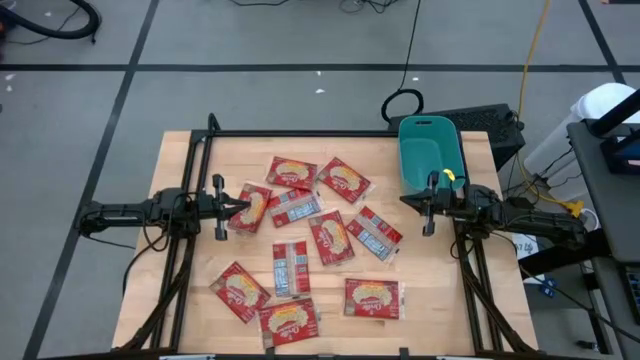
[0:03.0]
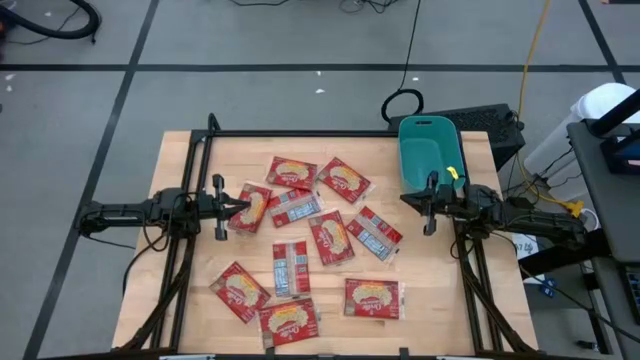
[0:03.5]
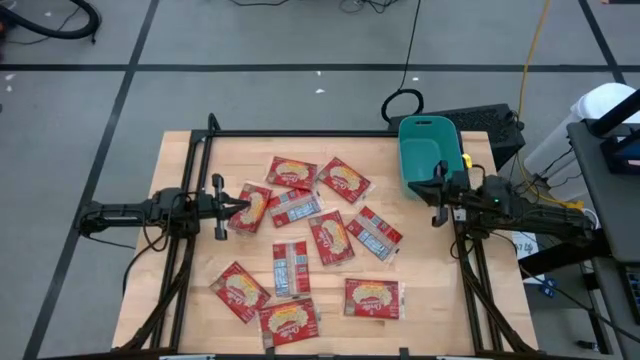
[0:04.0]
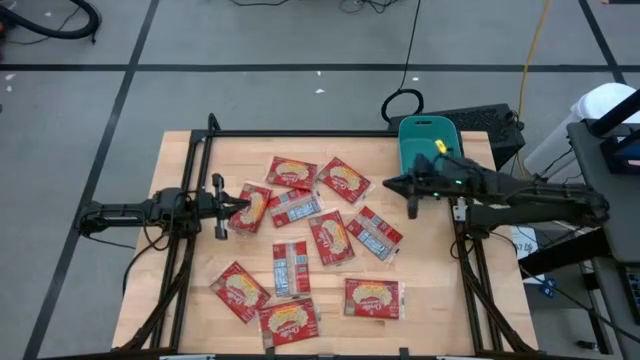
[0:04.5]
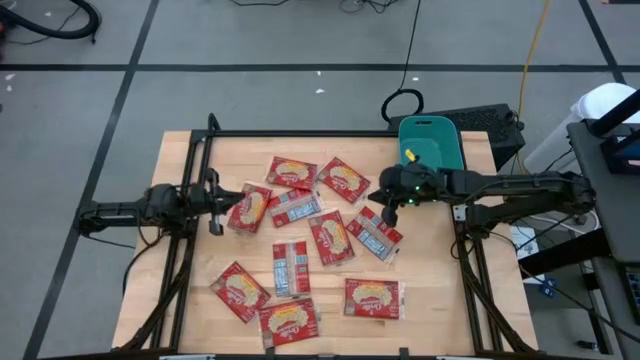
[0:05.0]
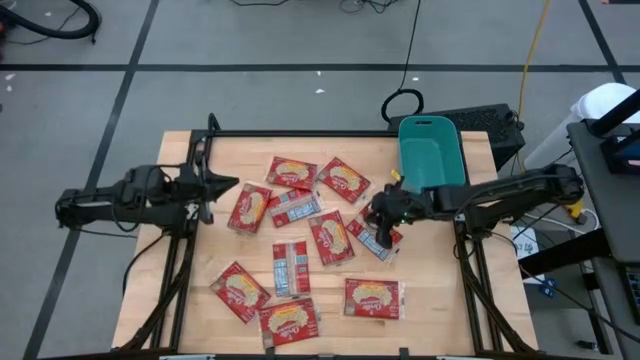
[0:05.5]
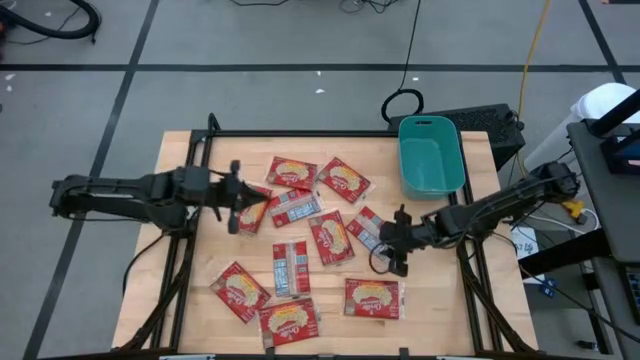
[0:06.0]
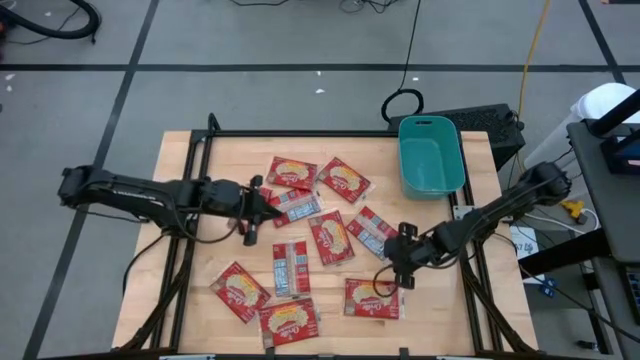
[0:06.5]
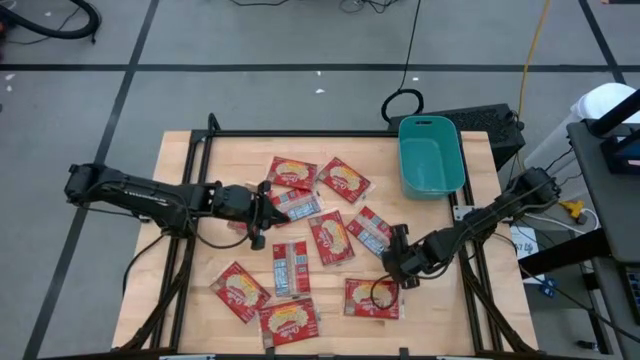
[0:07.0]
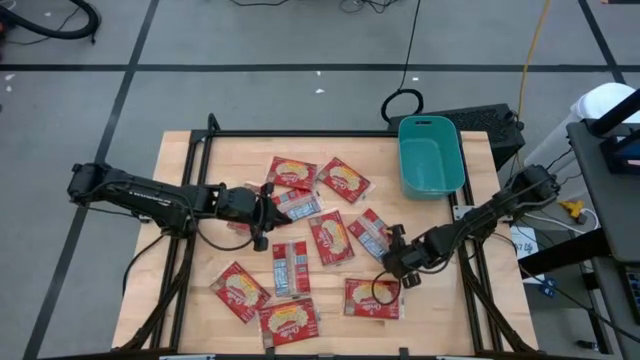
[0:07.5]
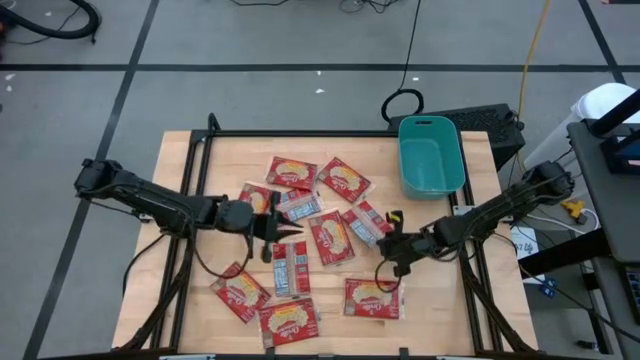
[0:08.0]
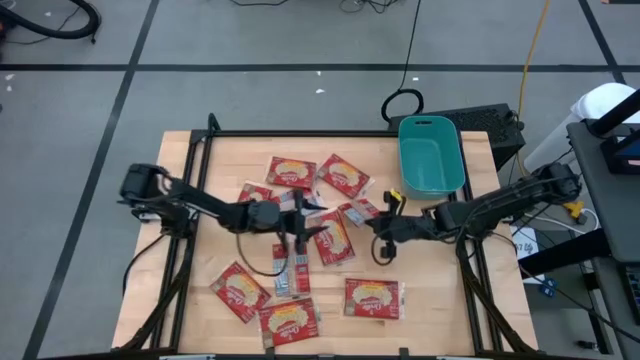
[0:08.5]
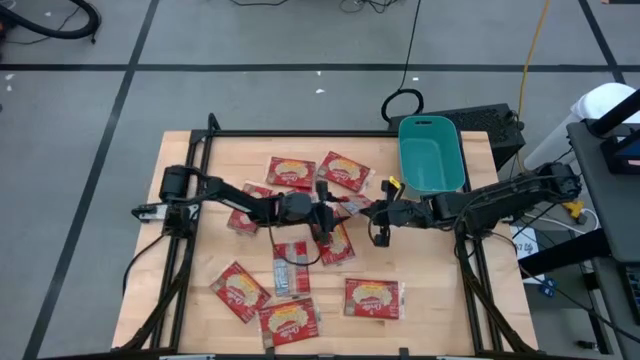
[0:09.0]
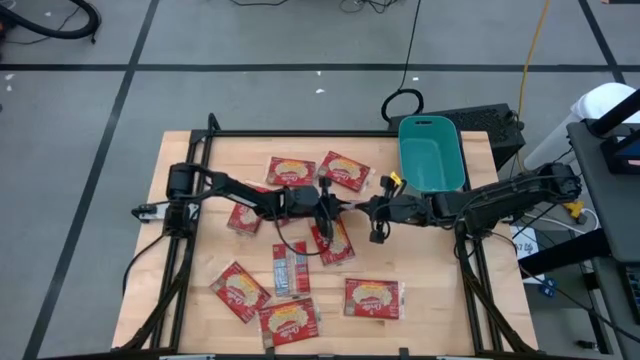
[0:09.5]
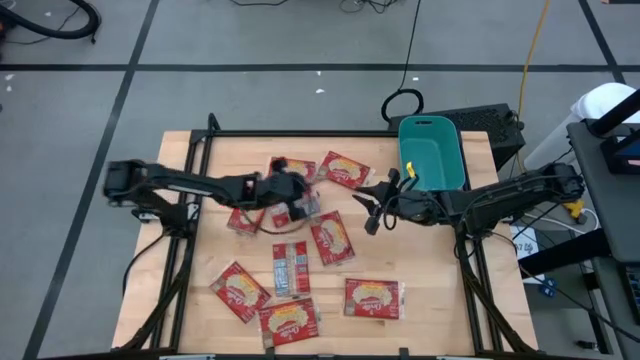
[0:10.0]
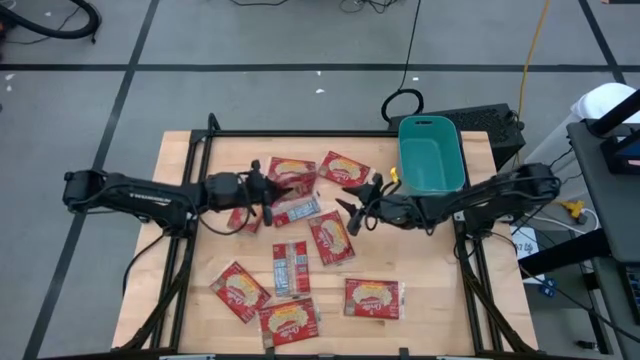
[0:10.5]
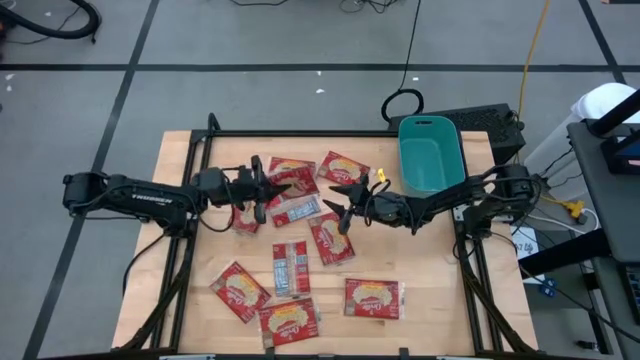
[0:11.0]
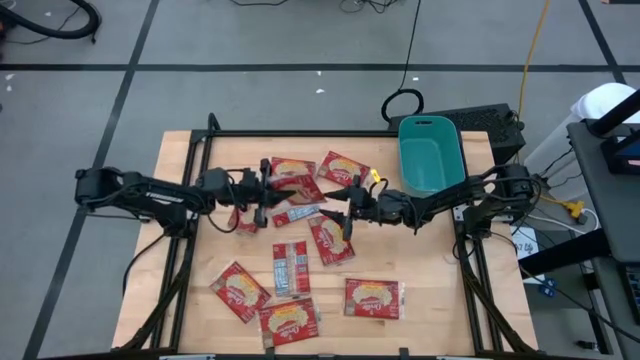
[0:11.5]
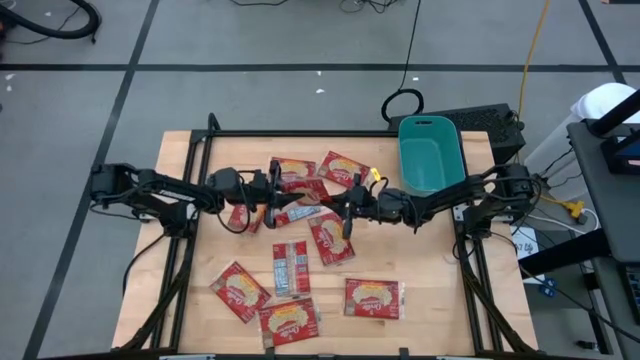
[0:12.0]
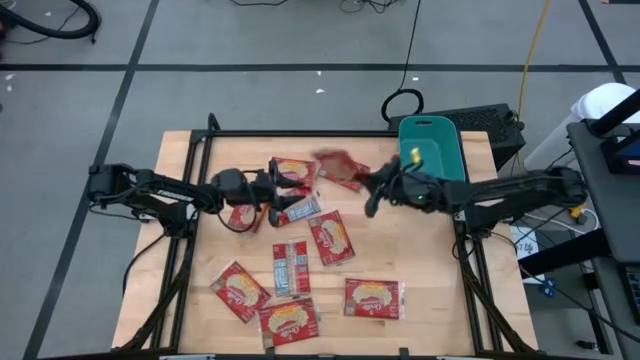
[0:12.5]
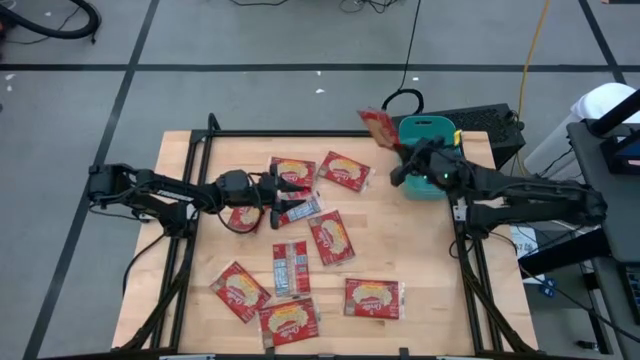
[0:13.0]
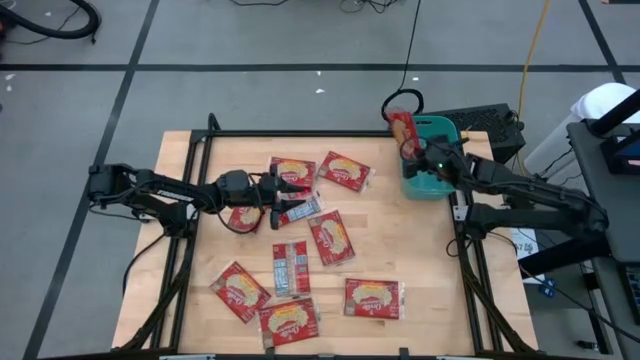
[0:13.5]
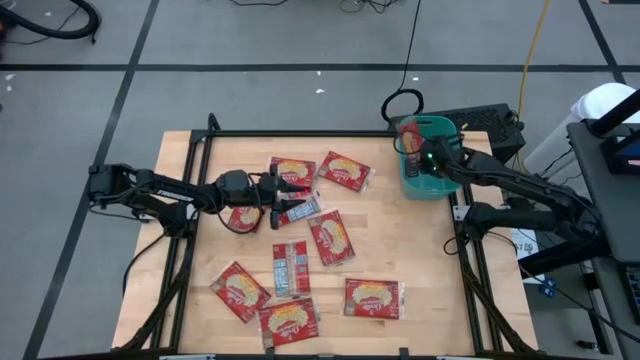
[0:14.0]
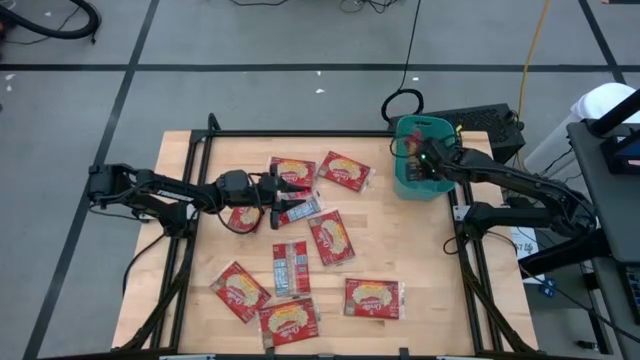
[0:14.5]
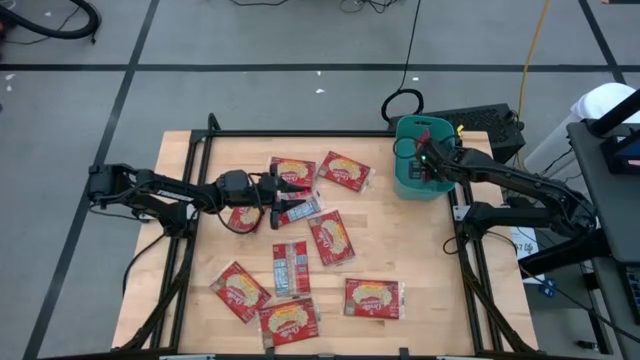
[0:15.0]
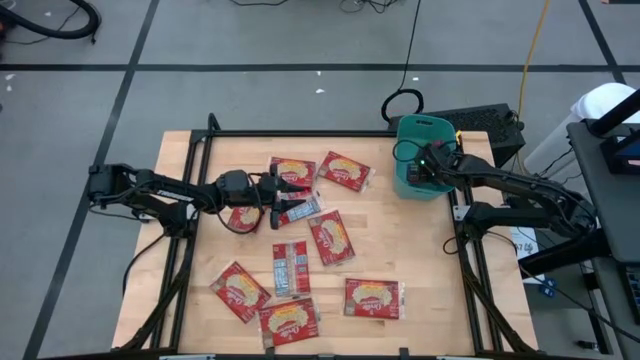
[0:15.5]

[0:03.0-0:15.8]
Task: Sort popcorn bags into baskets
Put the red popcorn bag into the green bin

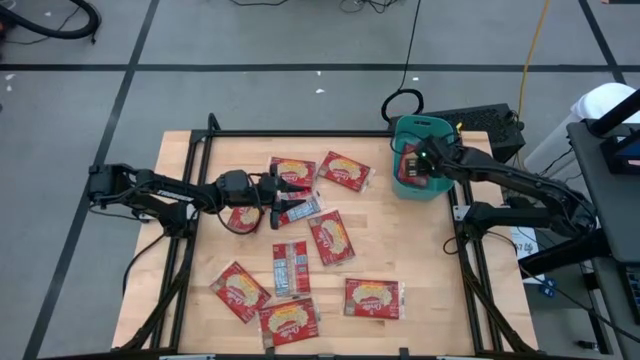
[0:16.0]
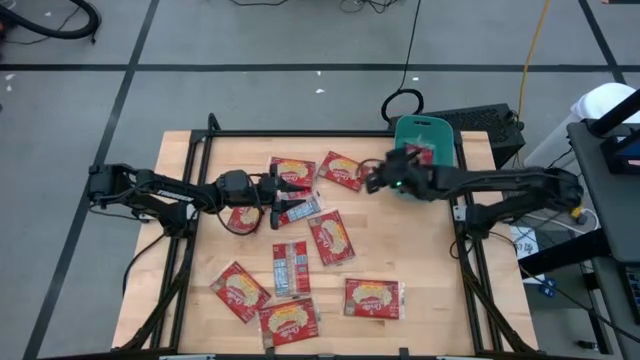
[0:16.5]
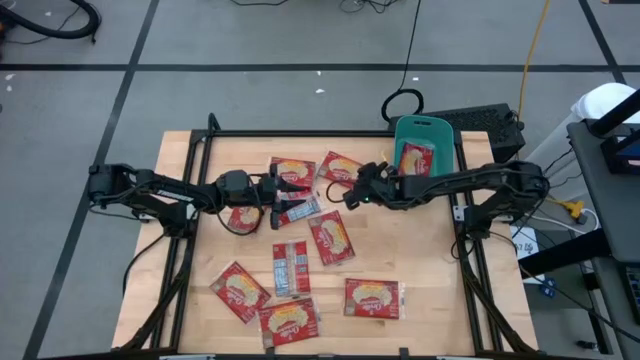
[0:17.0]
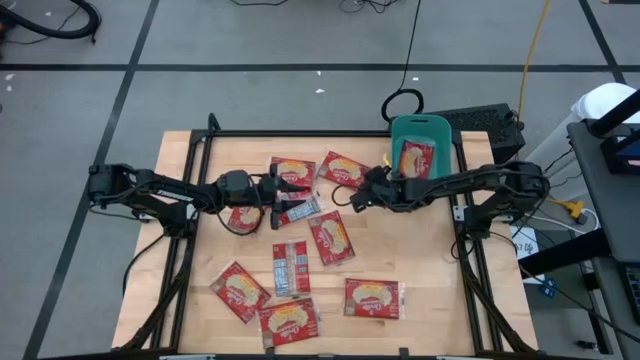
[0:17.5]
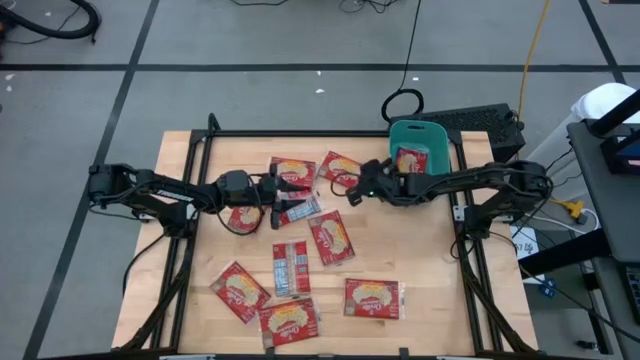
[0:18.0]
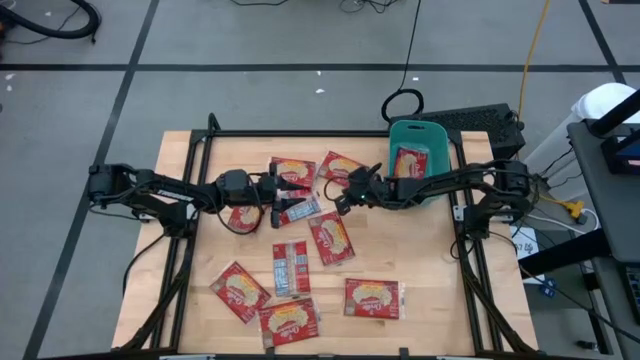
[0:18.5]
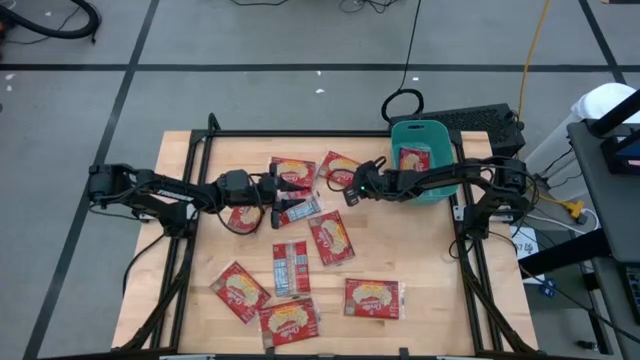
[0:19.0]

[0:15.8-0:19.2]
Adjust the green bin

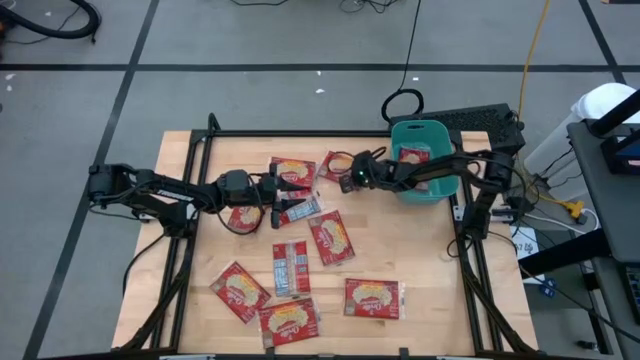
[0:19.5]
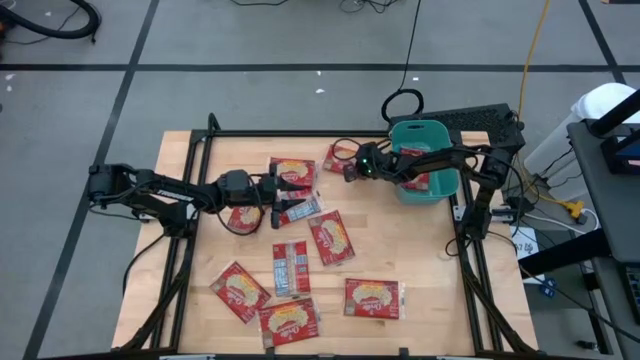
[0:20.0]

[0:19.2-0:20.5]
Adjust the red popcorn bag

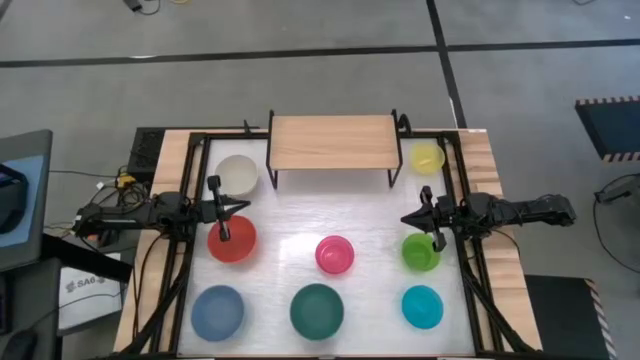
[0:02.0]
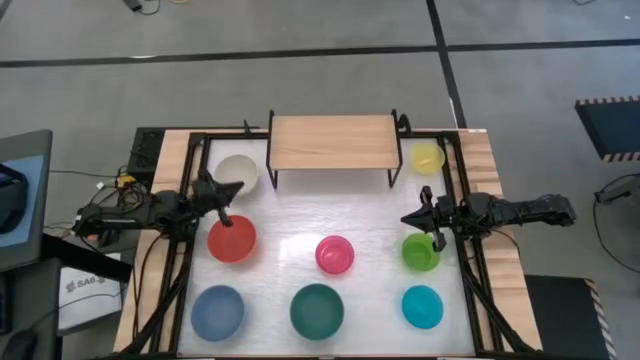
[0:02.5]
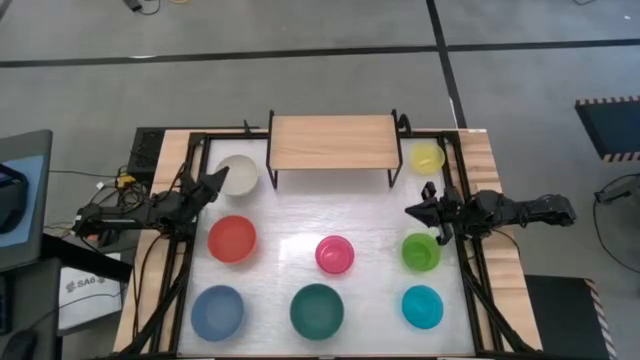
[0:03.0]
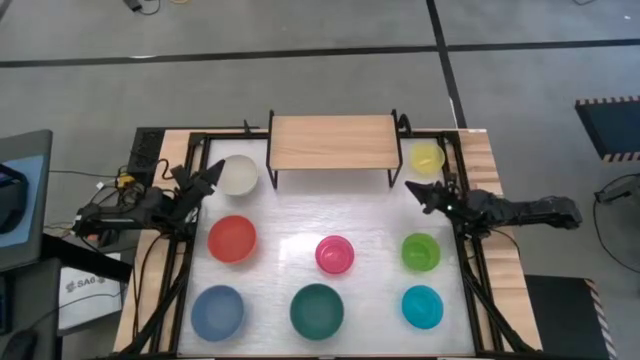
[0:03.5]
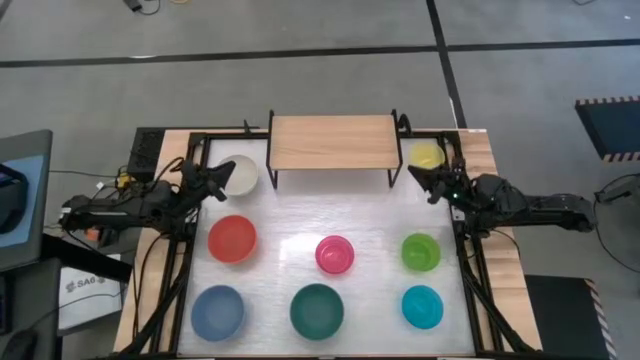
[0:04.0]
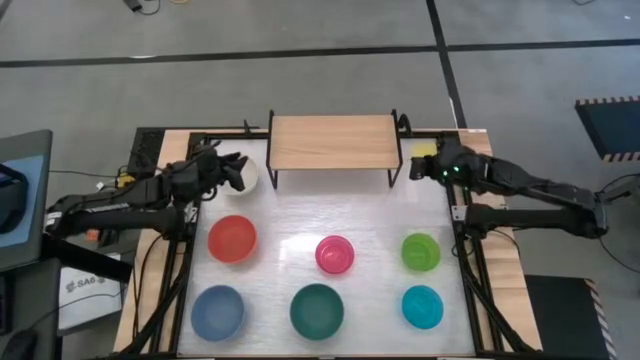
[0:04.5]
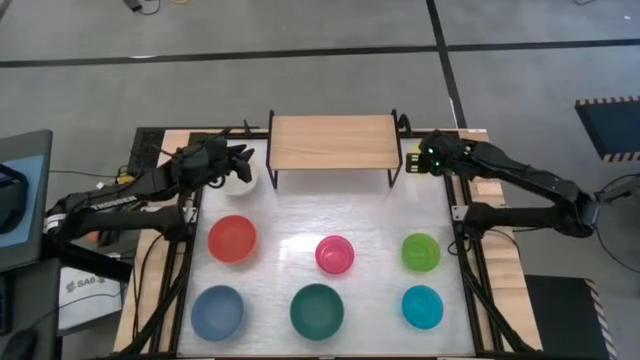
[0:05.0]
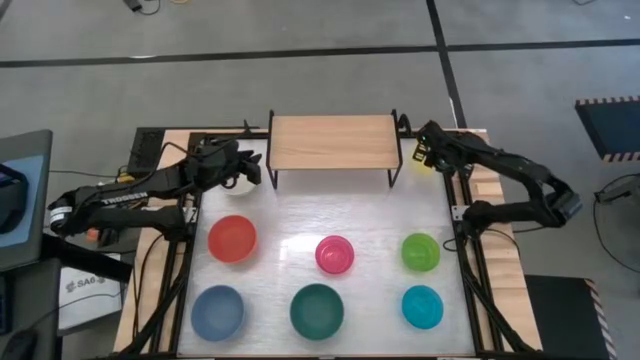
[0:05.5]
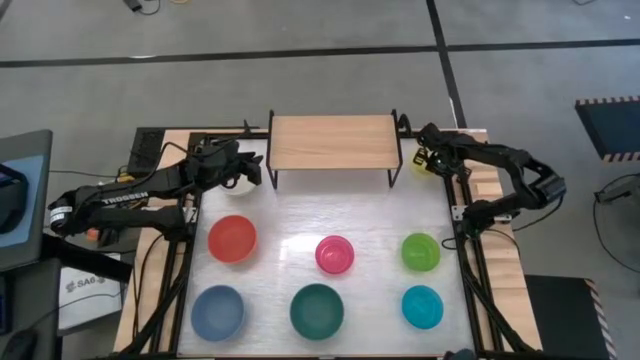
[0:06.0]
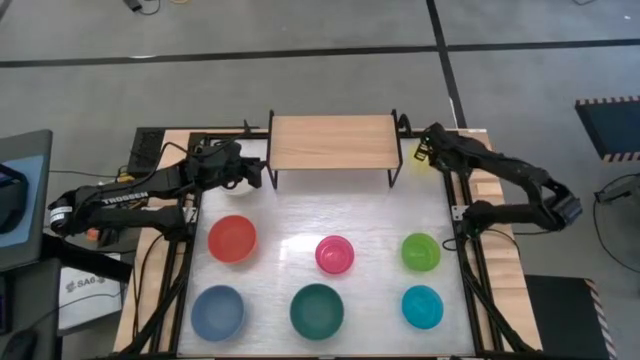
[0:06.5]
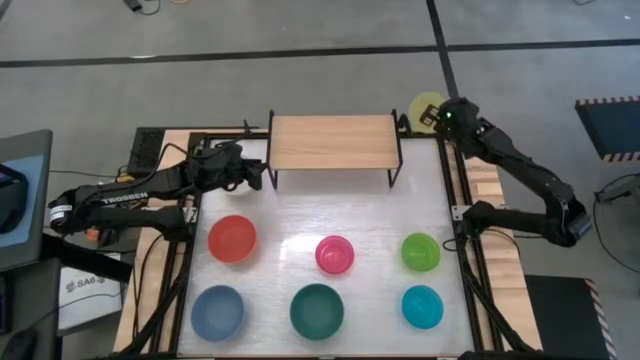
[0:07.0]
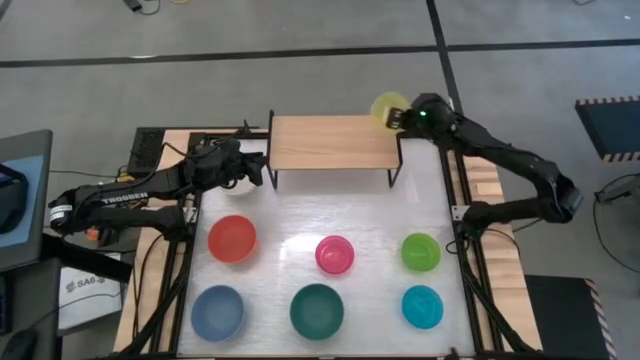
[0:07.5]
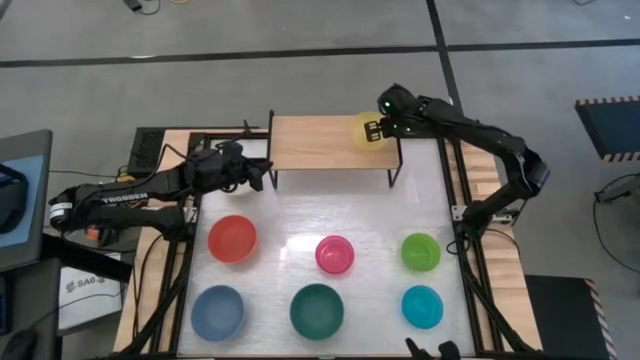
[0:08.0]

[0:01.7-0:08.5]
Task: Place and stack bowls onto a shelf
Put the yellow bowl on the shelf
